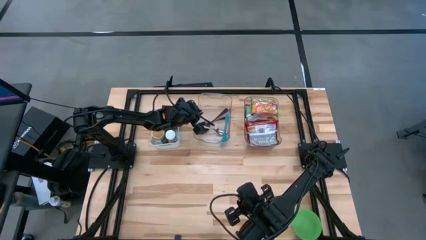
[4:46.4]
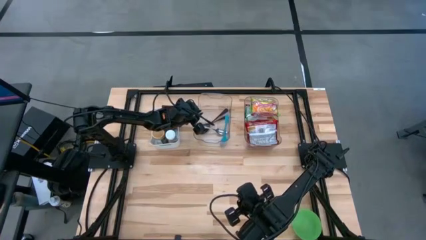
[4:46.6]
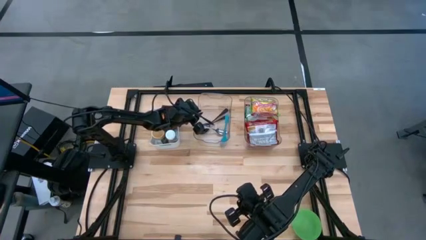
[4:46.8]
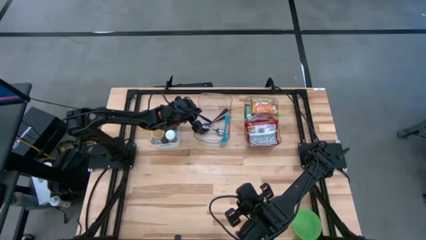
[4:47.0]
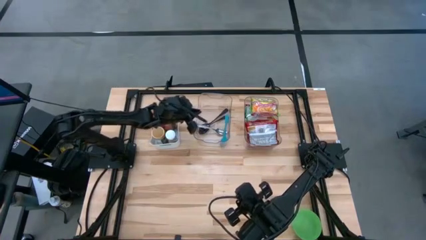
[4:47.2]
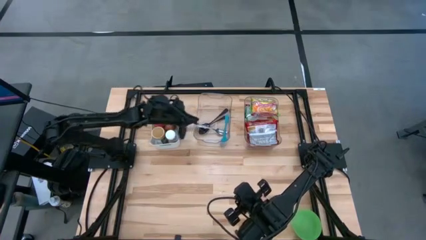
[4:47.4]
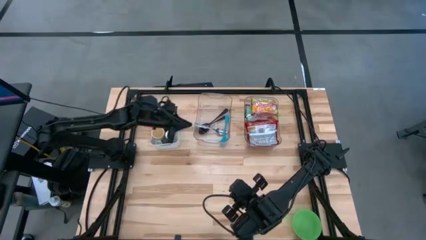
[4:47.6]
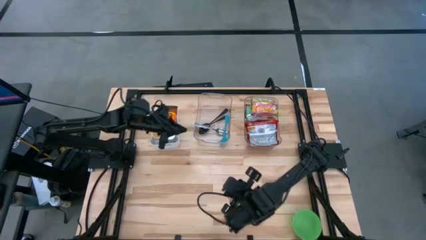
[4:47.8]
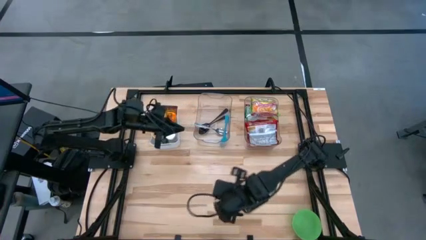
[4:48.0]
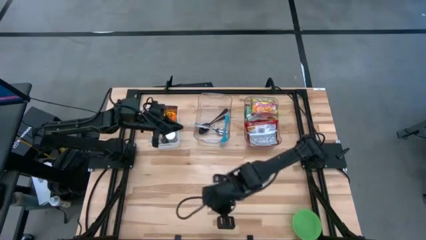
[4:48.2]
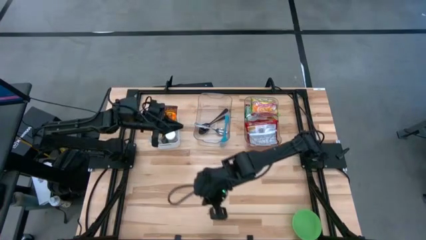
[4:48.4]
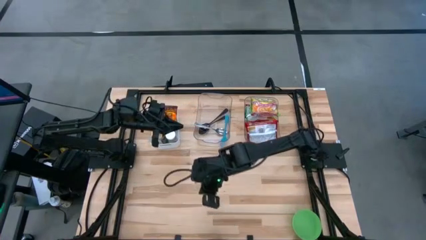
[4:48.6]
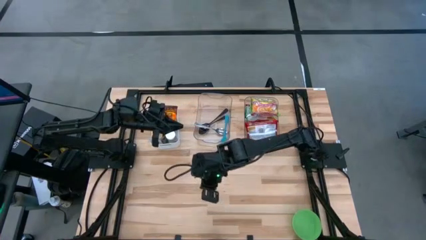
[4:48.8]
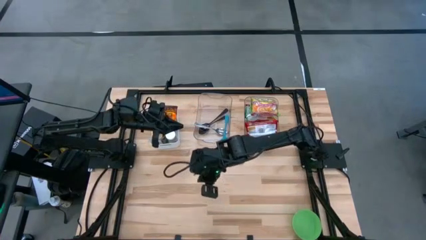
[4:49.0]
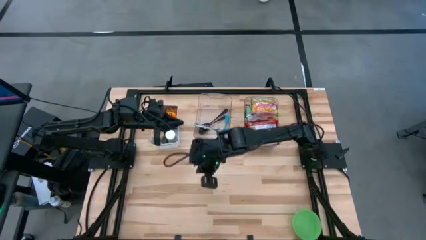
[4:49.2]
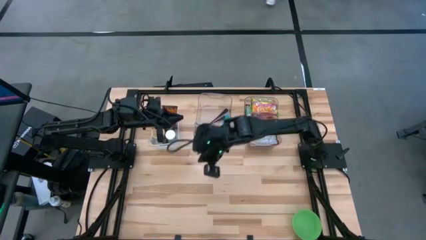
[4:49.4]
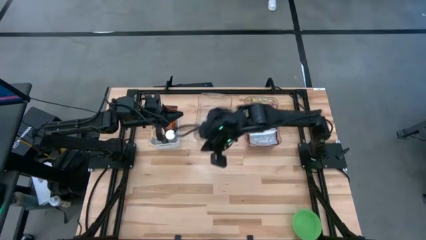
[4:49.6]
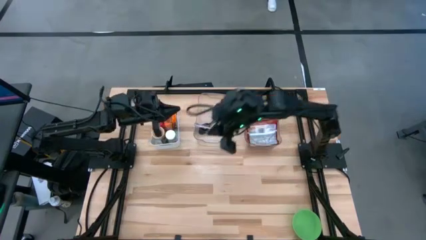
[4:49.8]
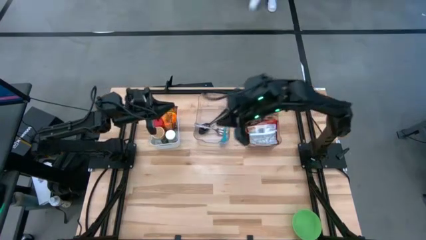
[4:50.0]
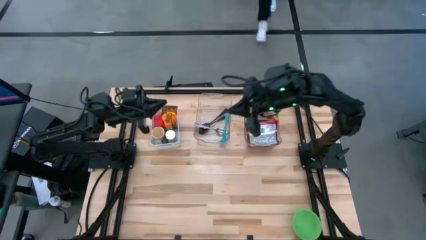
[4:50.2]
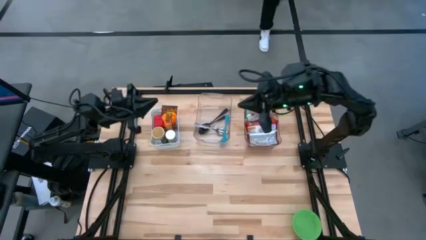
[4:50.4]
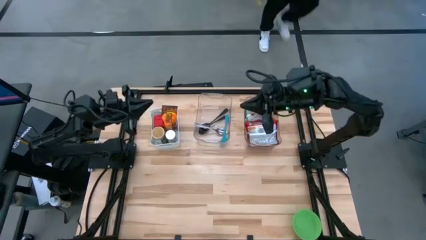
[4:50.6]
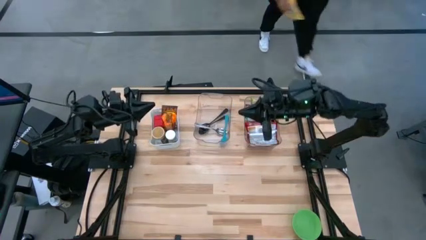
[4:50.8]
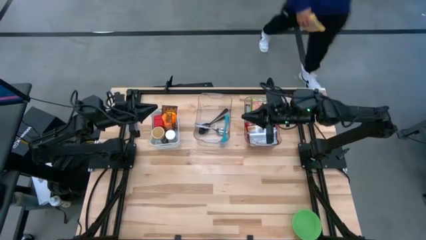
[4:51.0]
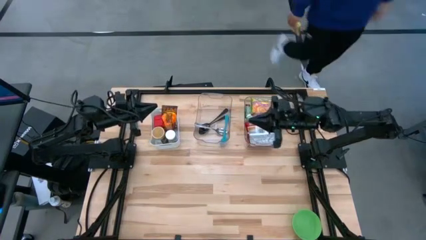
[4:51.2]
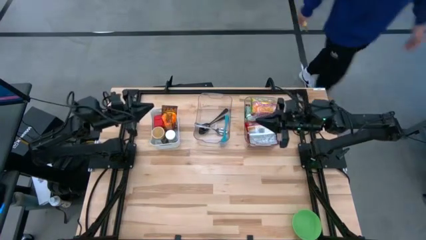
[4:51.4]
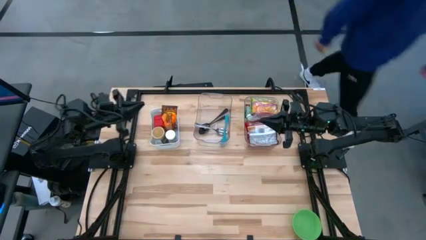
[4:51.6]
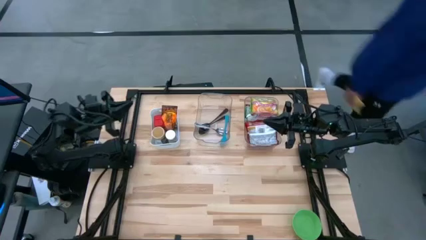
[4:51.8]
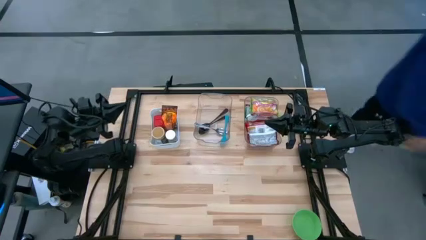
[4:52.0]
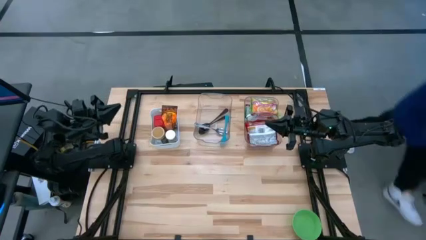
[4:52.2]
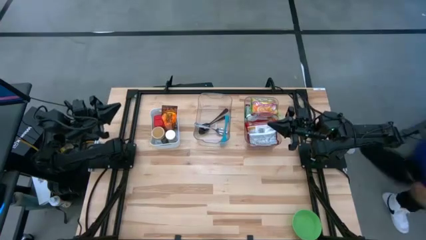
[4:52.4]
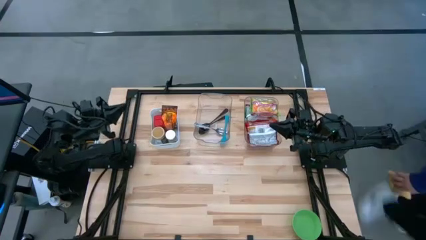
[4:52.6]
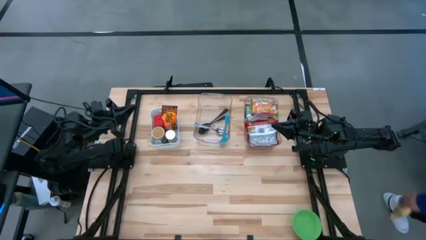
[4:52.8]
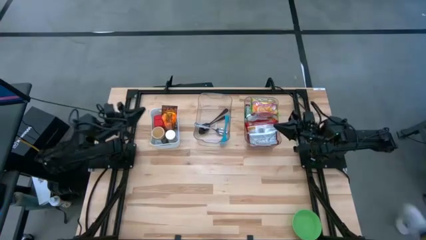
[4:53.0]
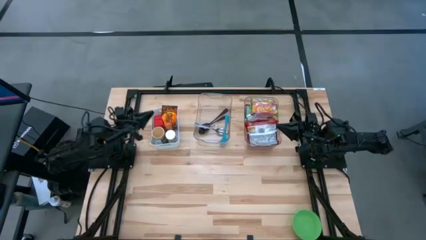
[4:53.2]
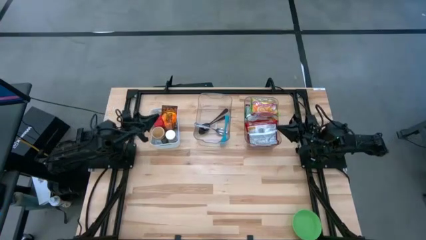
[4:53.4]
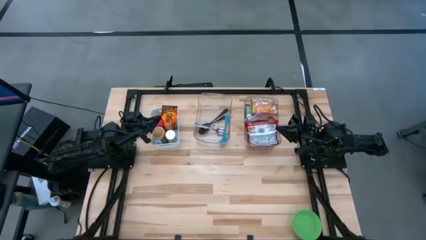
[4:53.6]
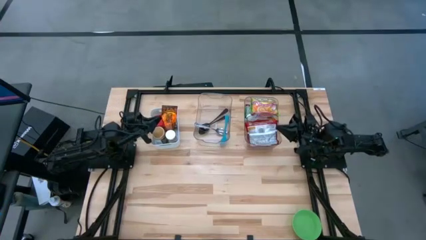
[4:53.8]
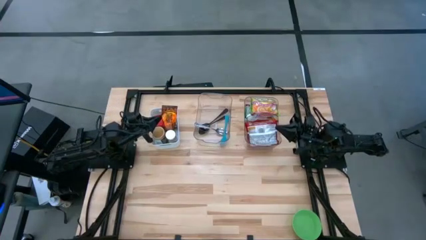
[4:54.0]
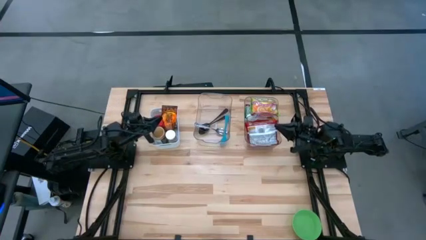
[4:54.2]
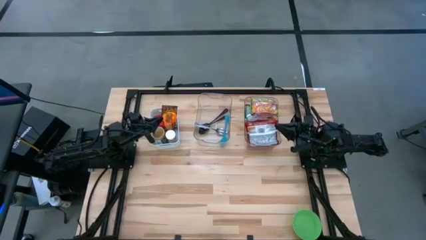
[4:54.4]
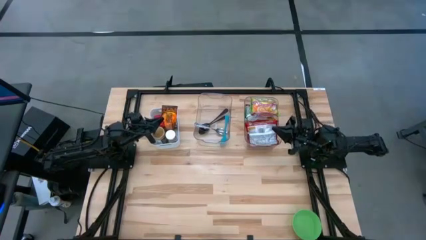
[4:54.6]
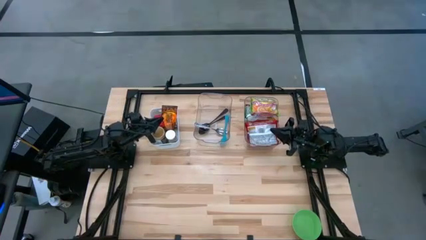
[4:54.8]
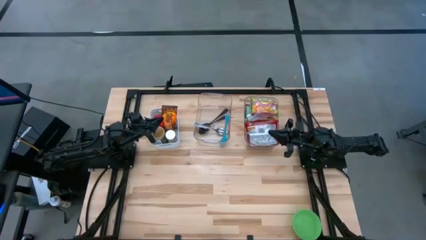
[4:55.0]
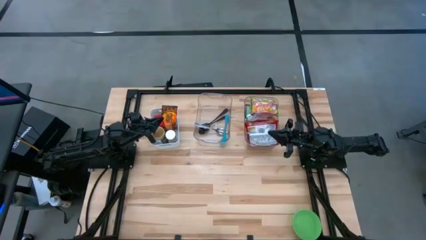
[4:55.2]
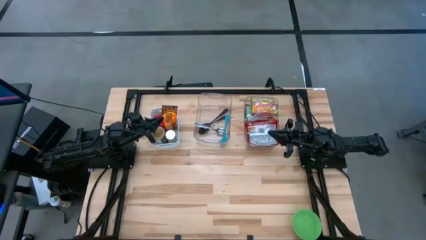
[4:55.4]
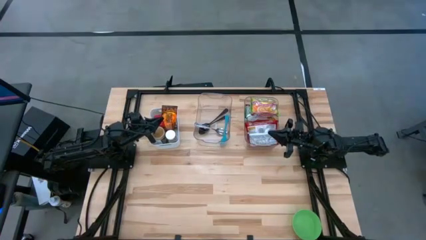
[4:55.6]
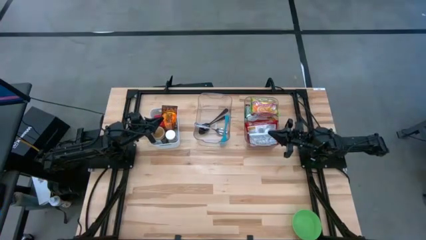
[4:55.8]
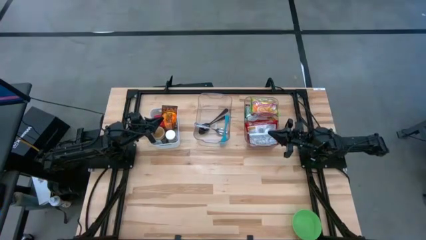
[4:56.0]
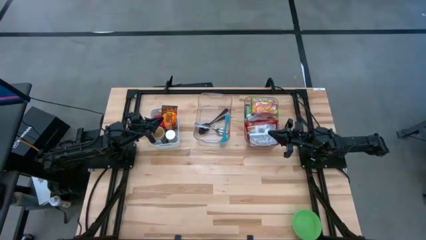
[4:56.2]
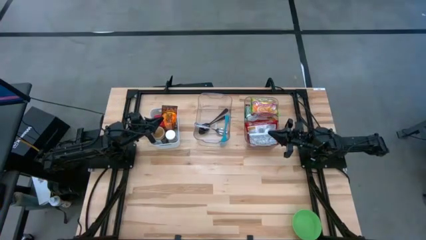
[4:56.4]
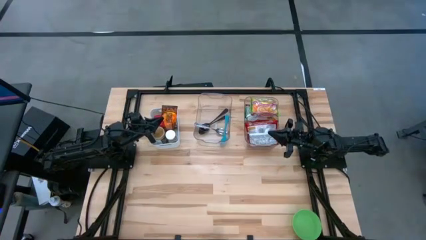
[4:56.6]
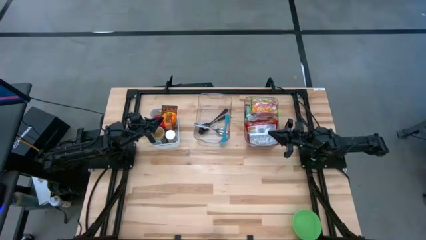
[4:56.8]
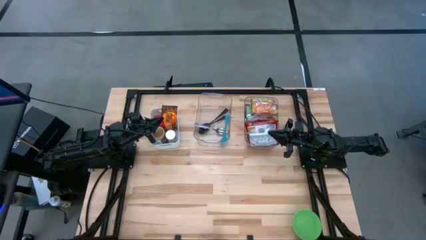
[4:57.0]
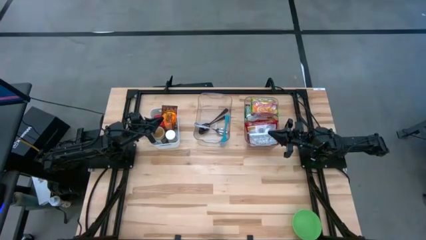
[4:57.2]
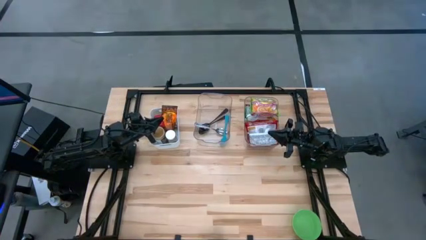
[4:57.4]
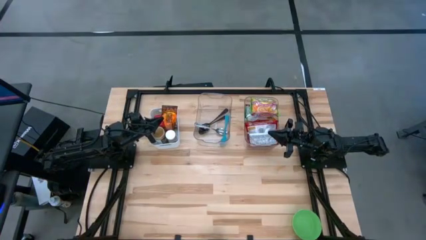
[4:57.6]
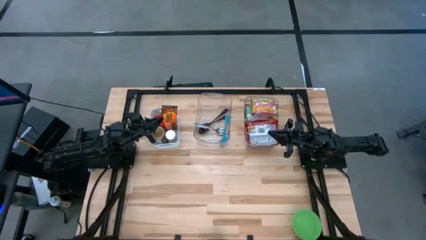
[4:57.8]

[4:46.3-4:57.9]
Task: Pick & Place Food Item
Return to Home Position
